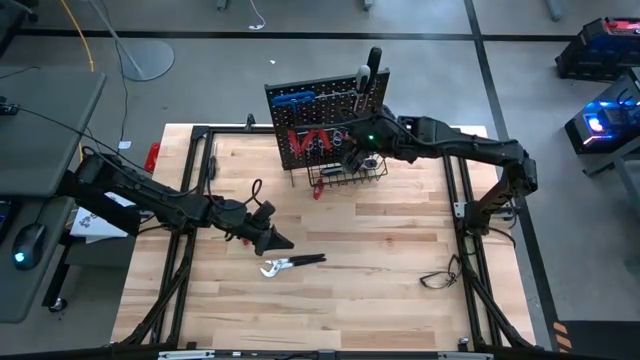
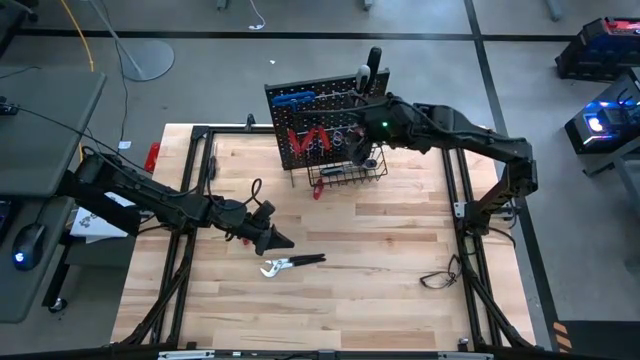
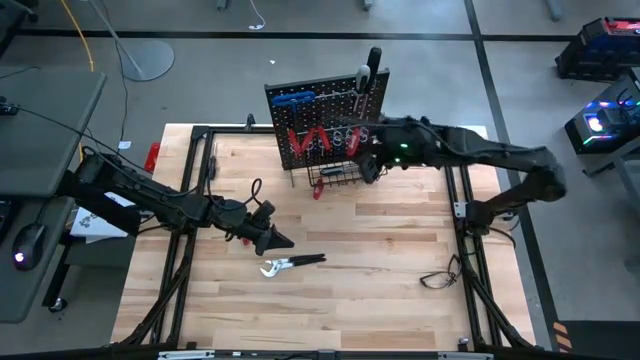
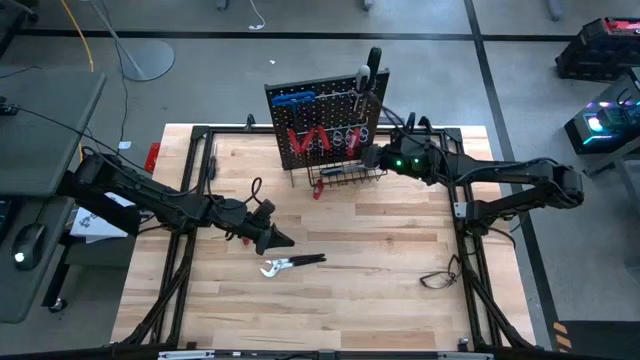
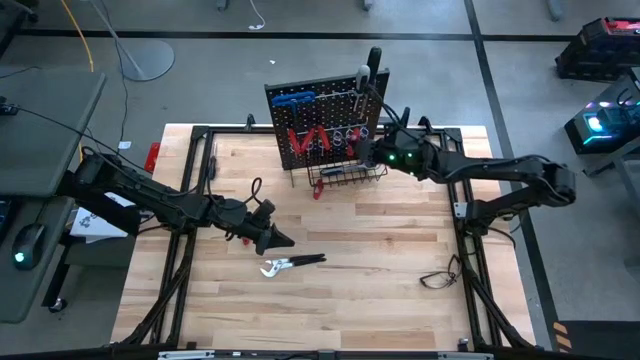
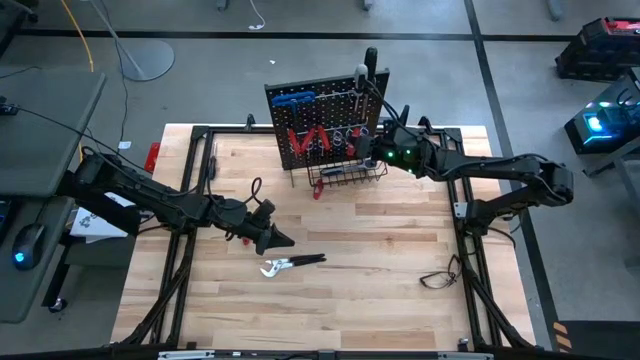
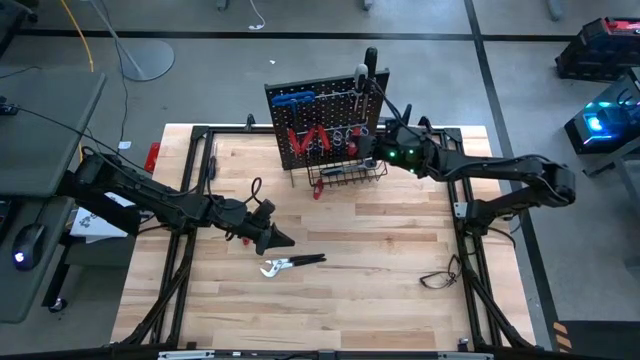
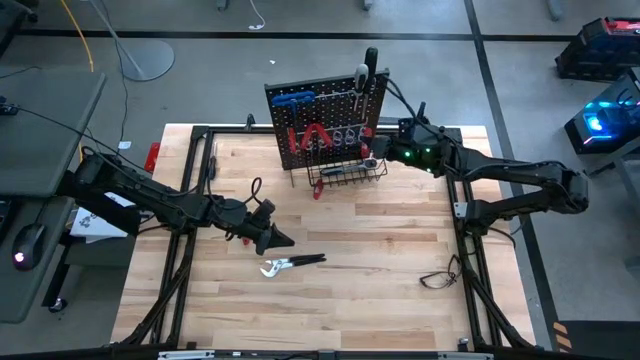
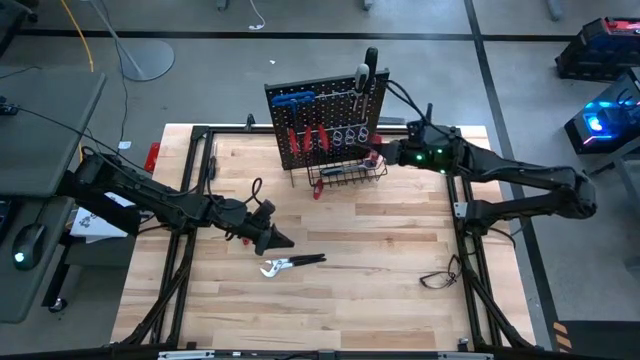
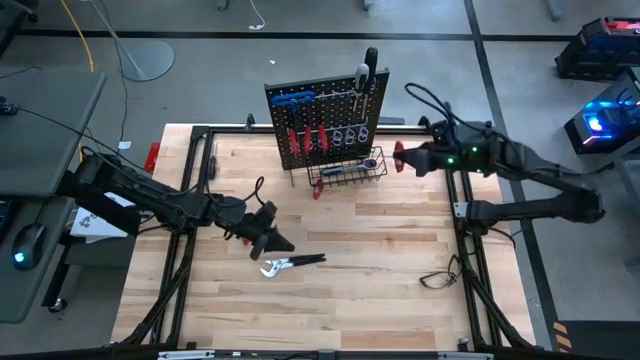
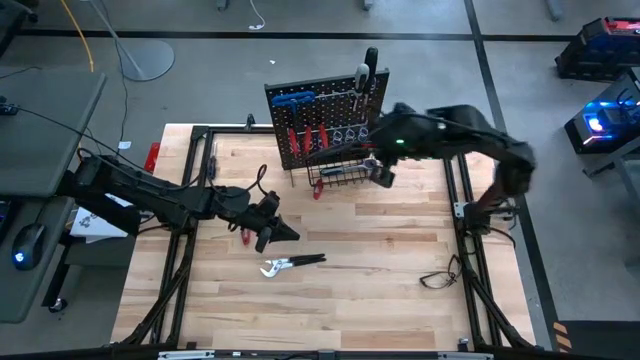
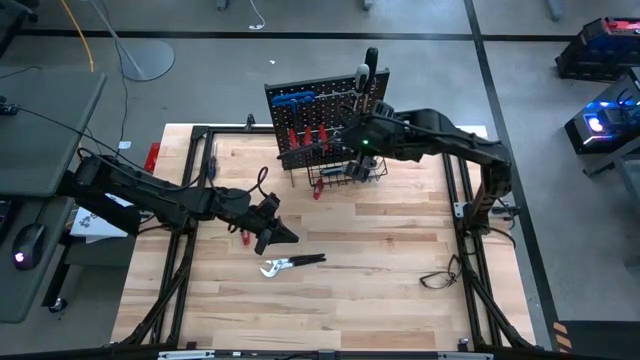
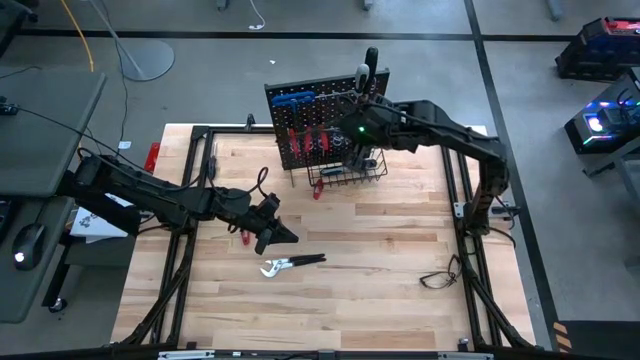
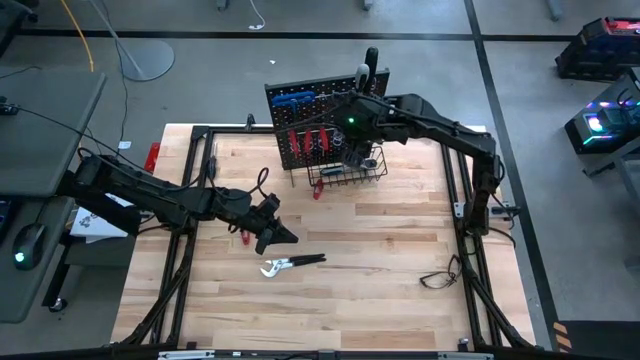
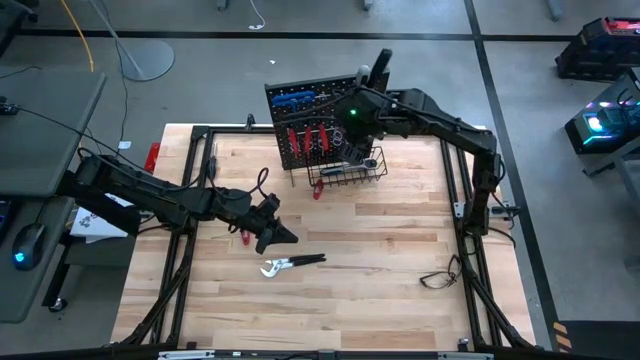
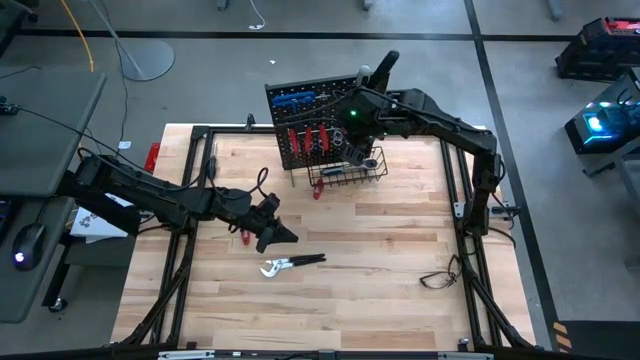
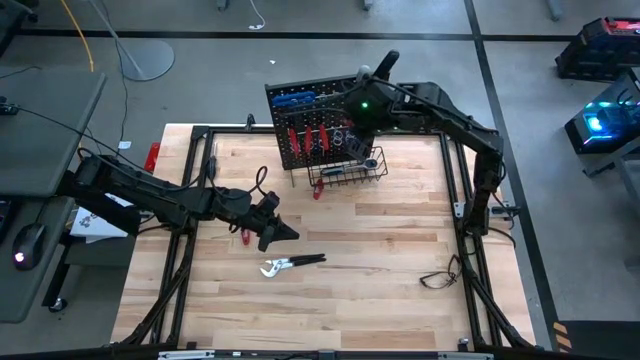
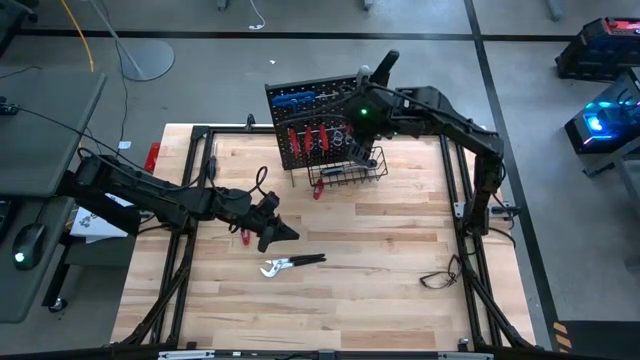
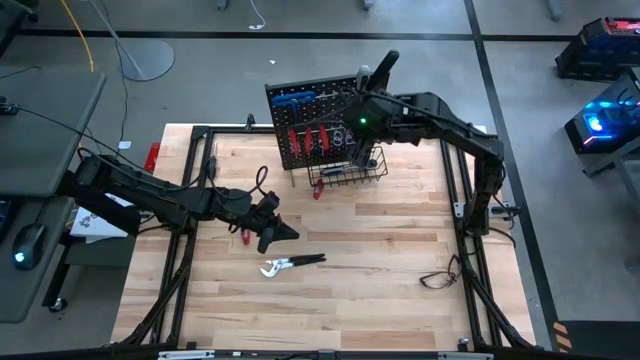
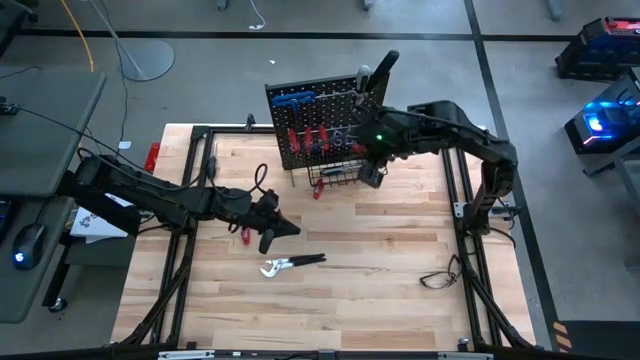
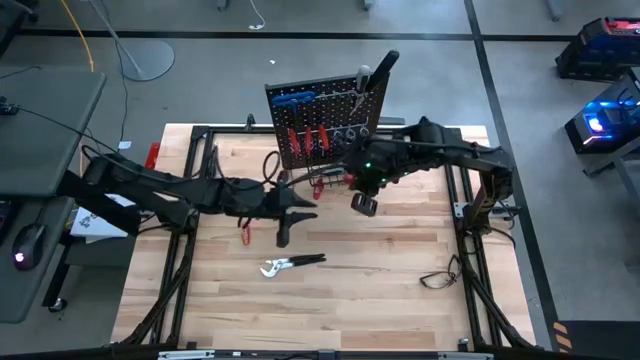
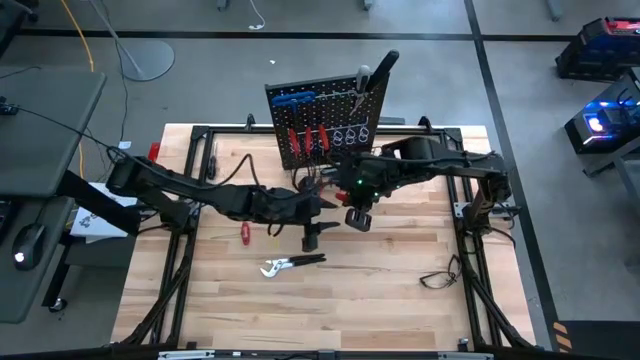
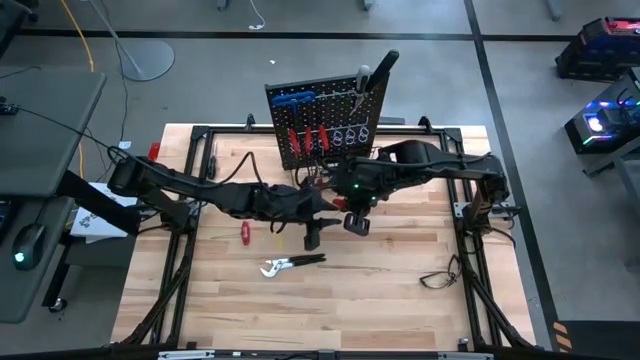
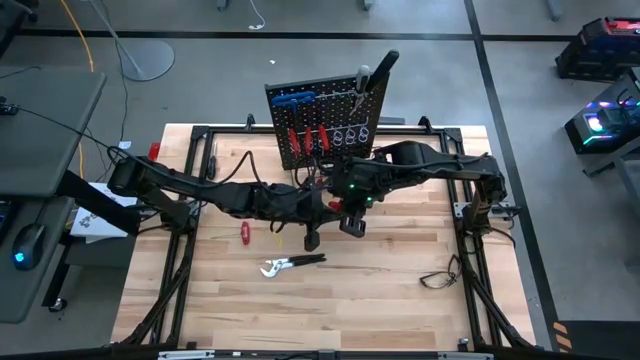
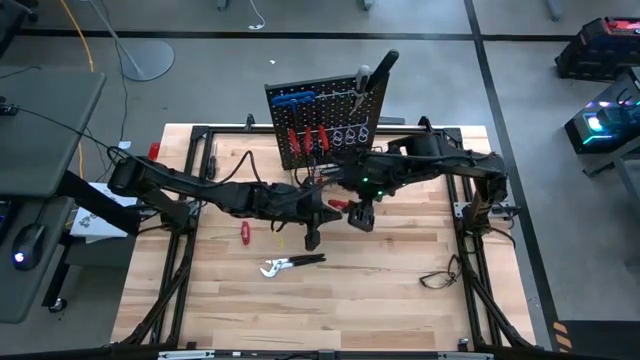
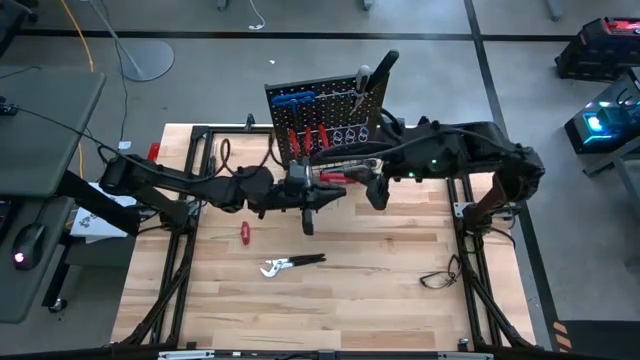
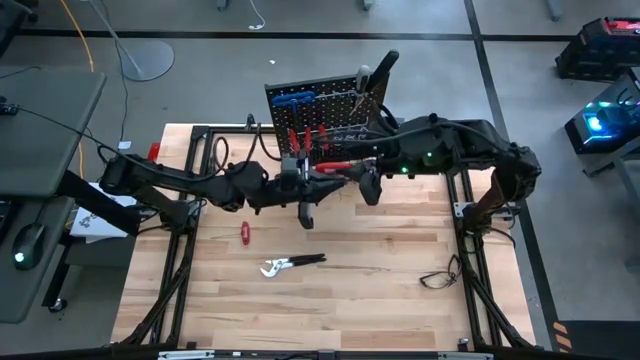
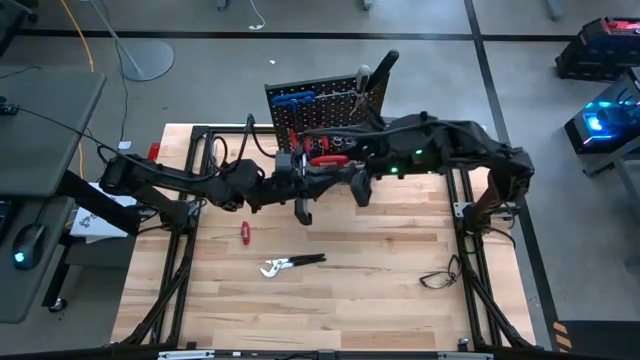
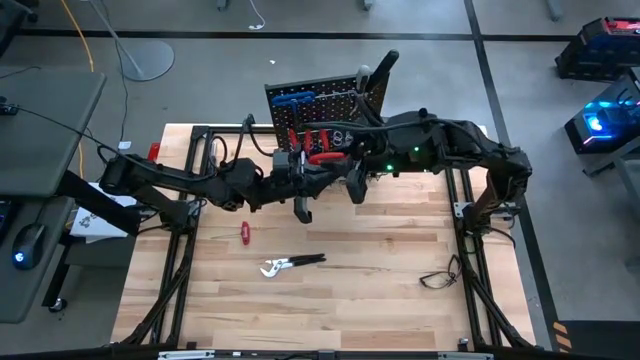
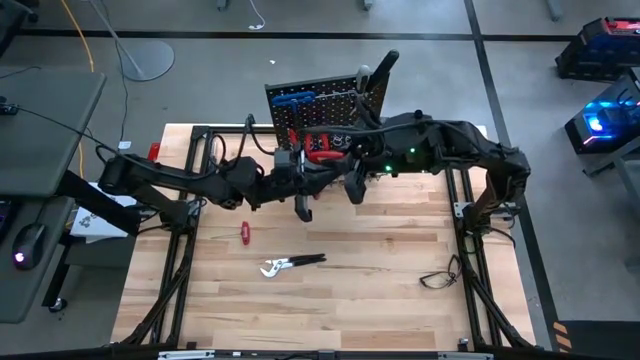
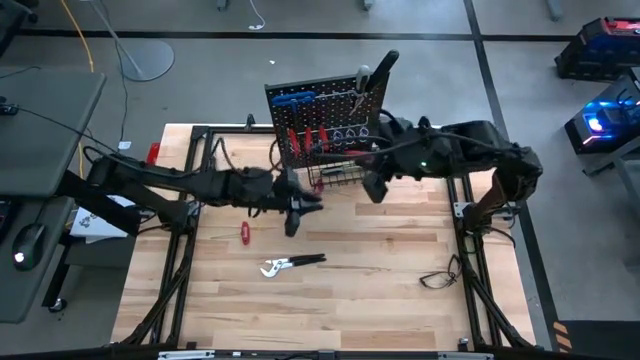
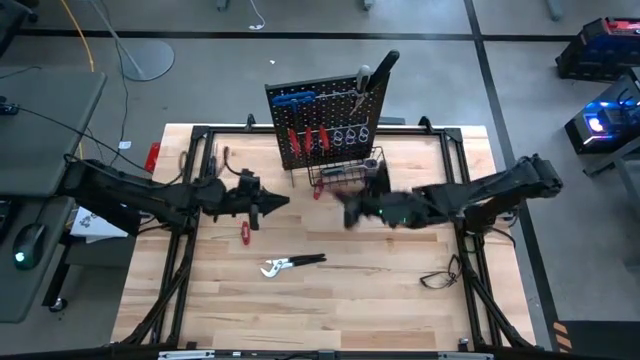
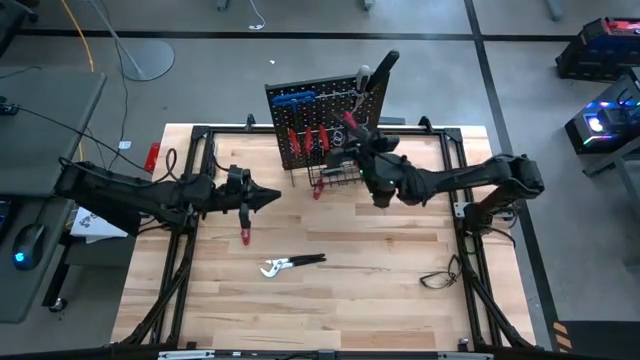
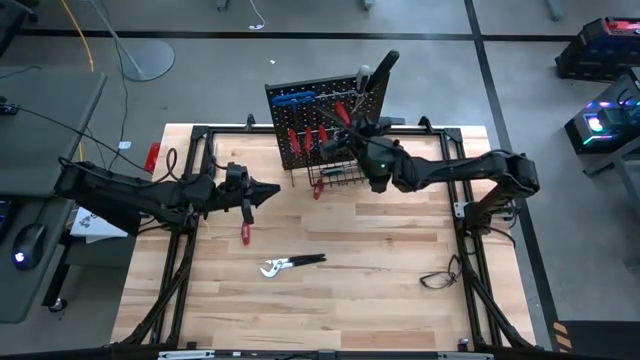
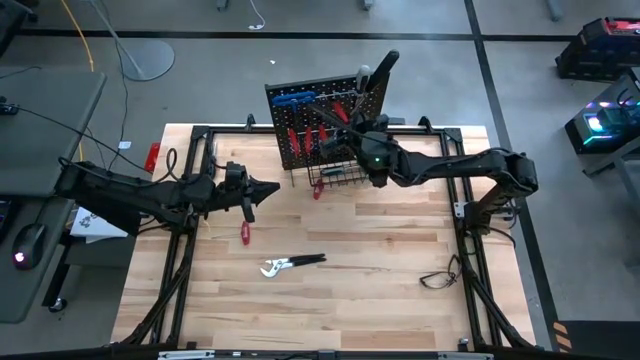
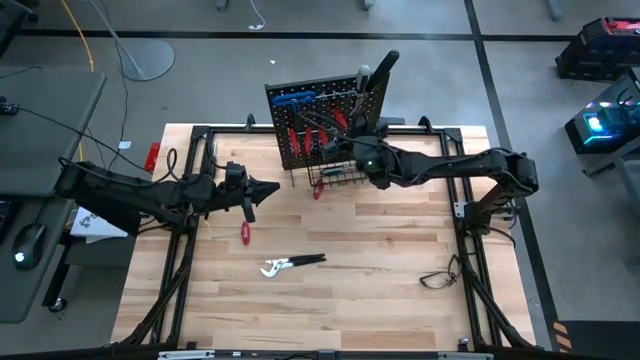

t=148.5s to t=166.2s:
Task: Hang tools onto peg board
Hang the red allen wrench on the peg board

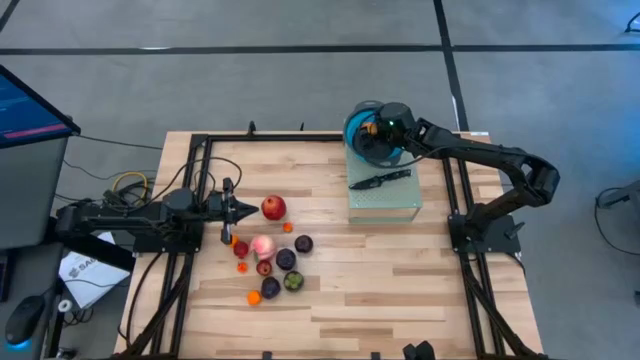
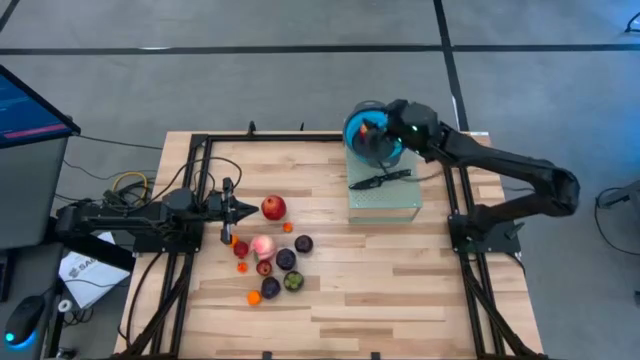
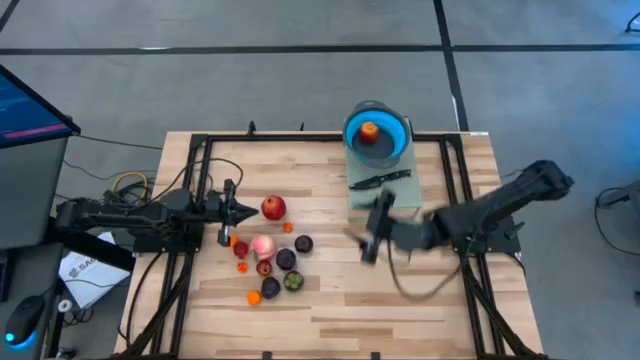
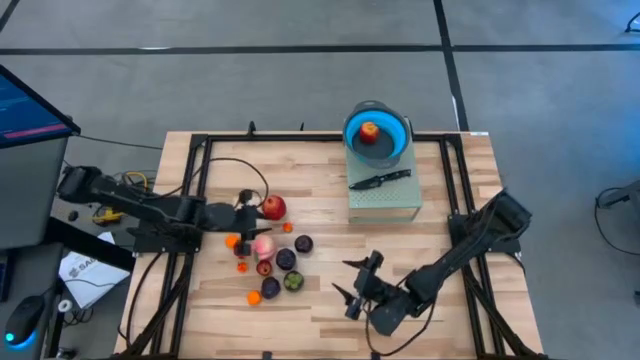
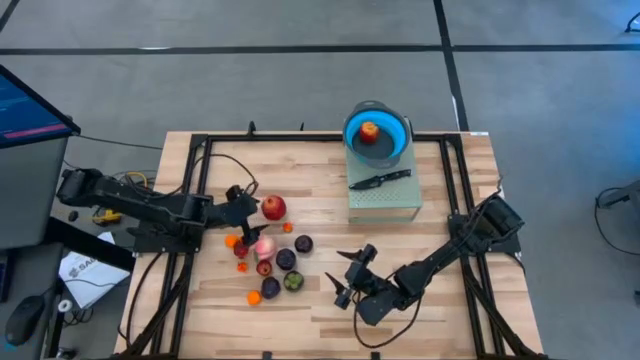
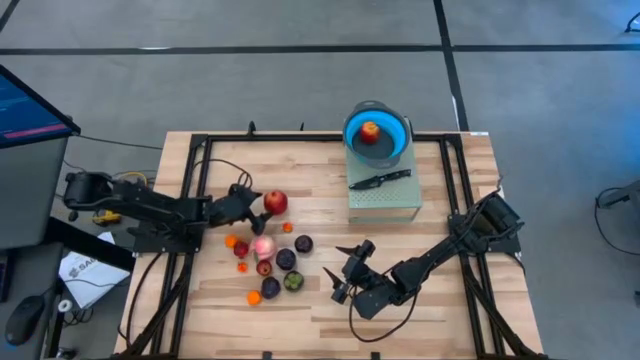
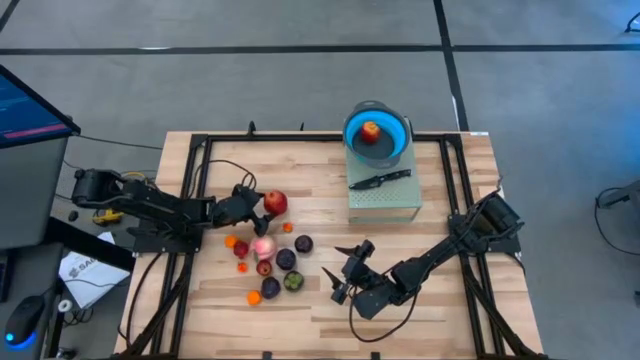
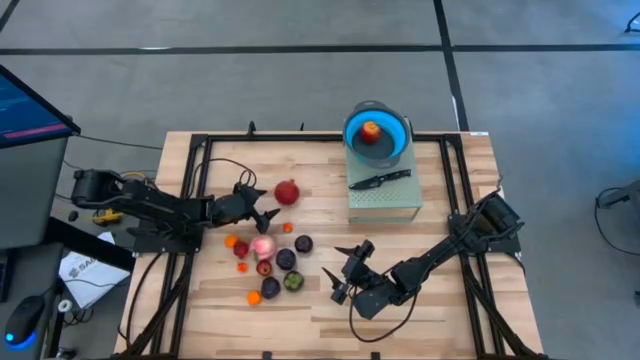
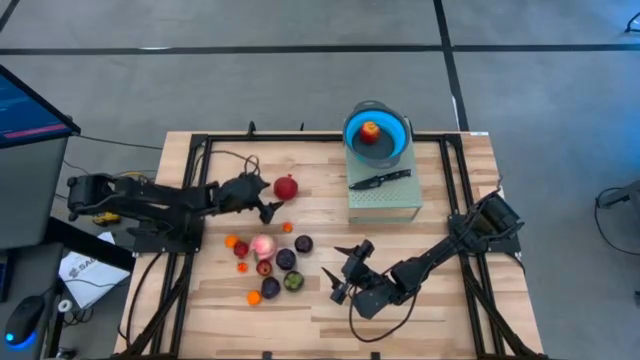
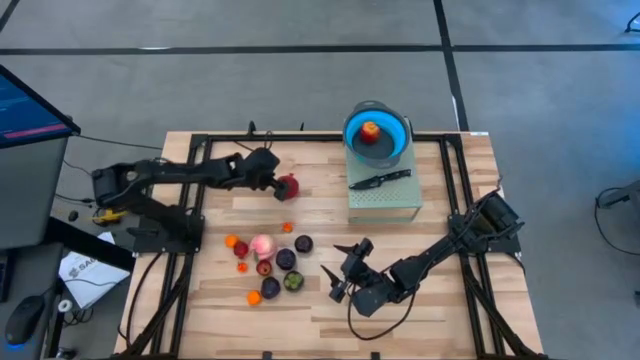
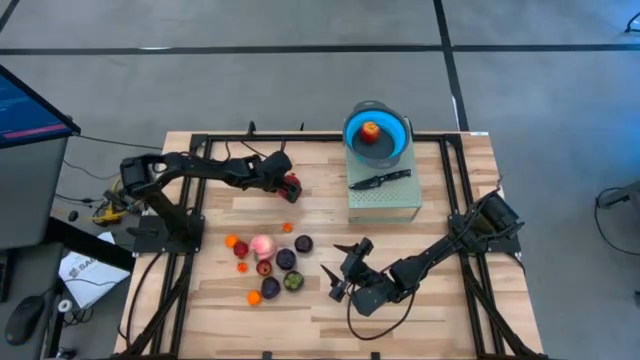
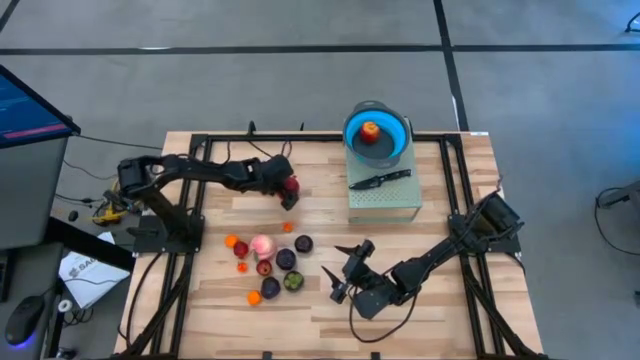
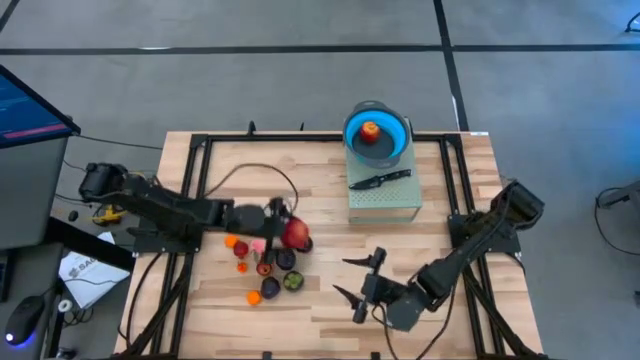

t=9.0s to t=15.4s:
Task: Pick & Place Fruit
Put the top red pomegranate into the blue strainer bowl on the shelf
